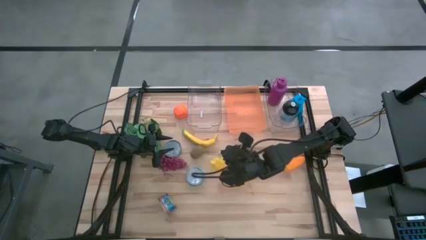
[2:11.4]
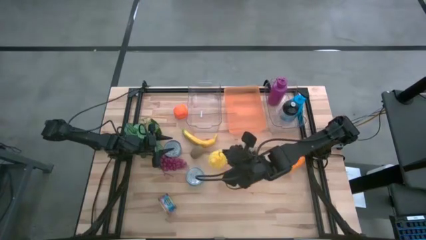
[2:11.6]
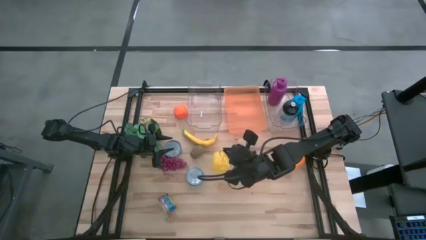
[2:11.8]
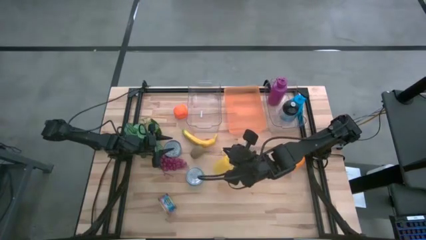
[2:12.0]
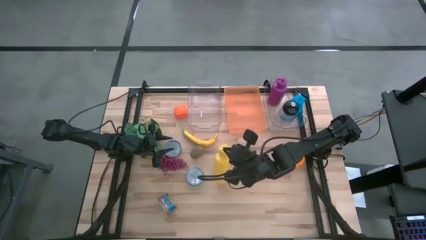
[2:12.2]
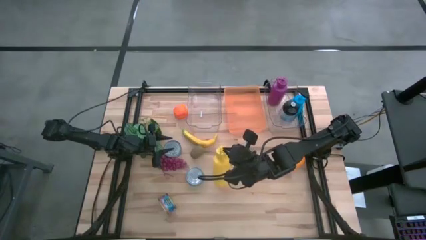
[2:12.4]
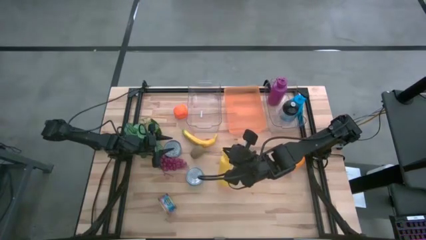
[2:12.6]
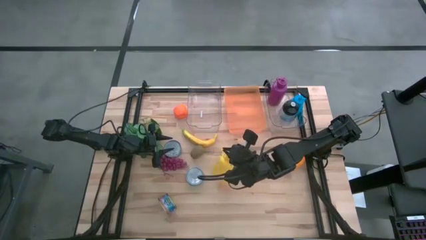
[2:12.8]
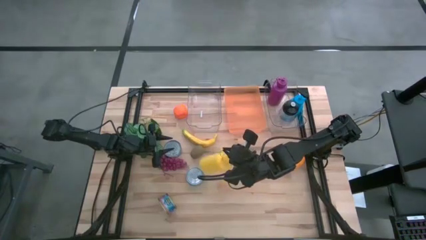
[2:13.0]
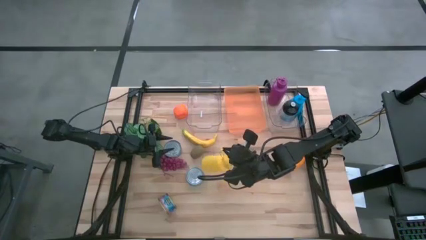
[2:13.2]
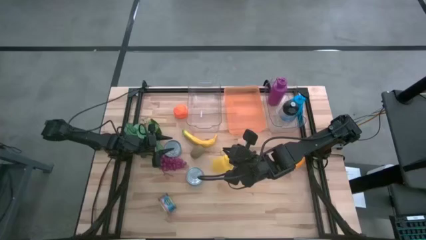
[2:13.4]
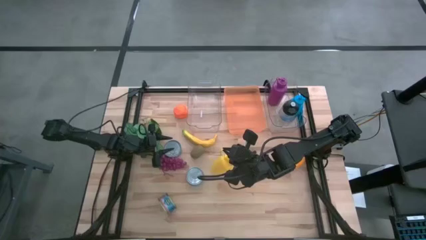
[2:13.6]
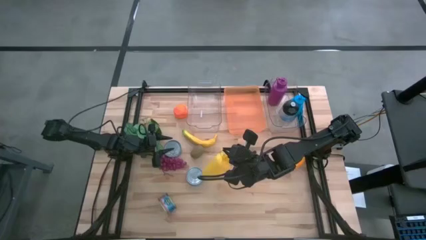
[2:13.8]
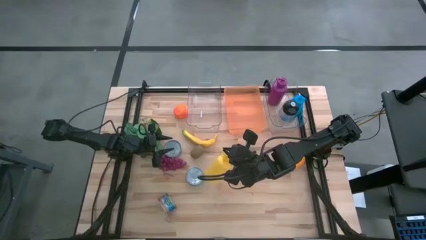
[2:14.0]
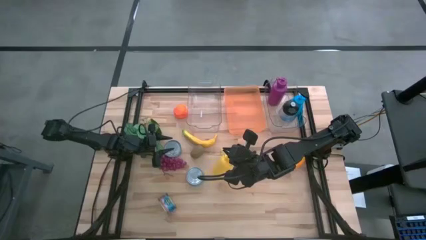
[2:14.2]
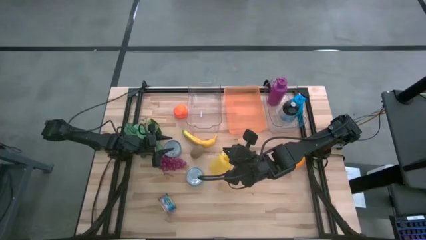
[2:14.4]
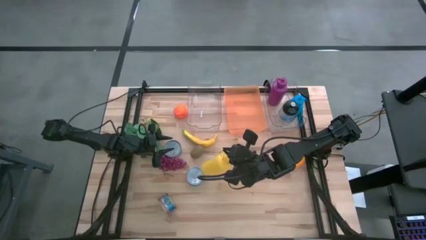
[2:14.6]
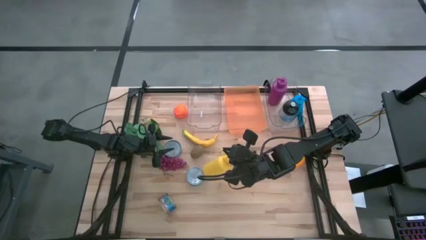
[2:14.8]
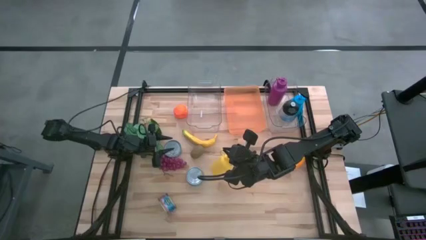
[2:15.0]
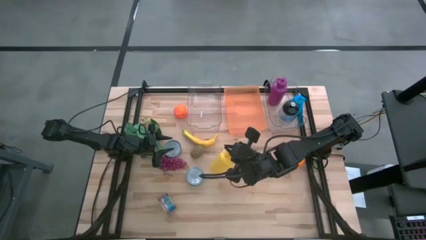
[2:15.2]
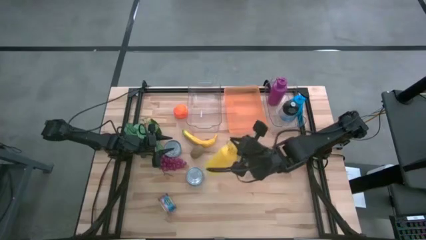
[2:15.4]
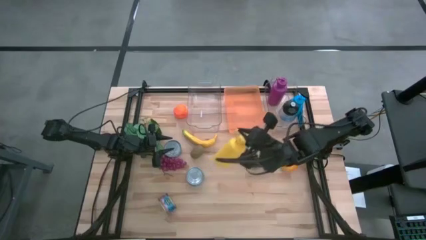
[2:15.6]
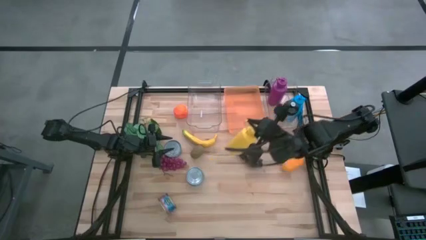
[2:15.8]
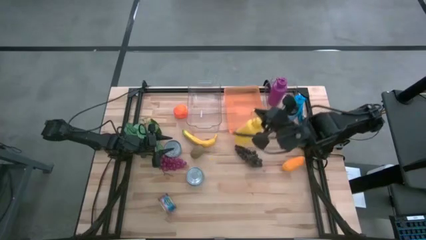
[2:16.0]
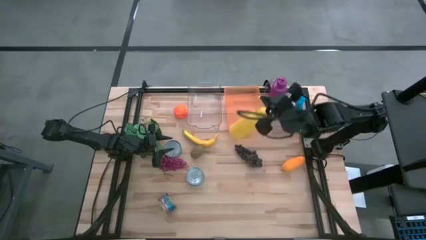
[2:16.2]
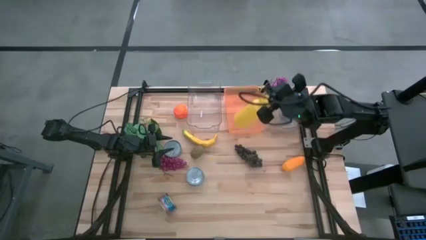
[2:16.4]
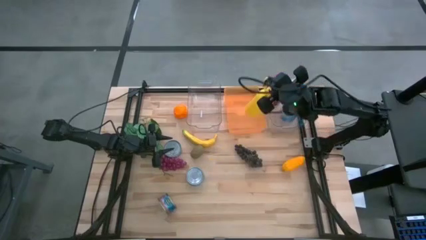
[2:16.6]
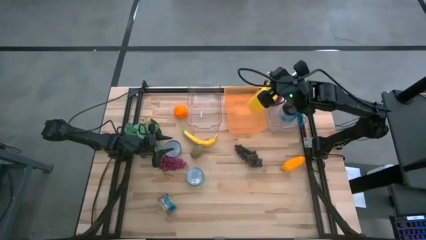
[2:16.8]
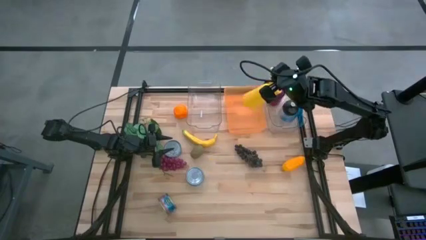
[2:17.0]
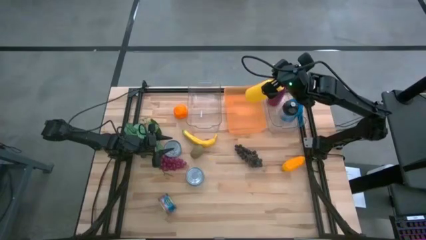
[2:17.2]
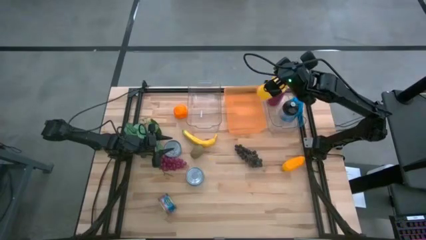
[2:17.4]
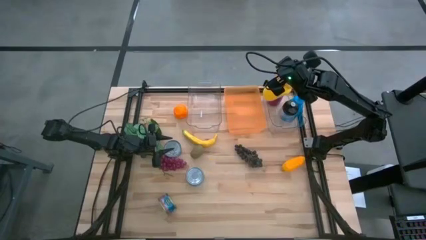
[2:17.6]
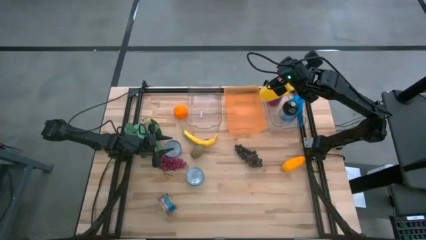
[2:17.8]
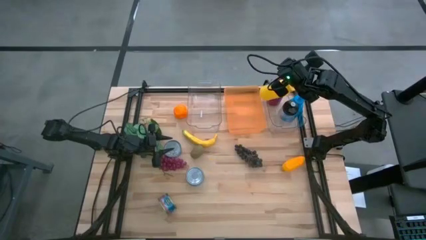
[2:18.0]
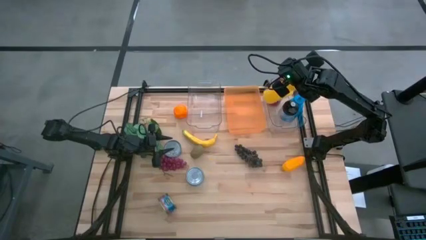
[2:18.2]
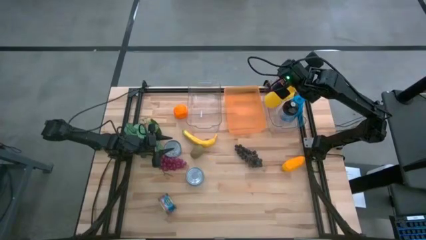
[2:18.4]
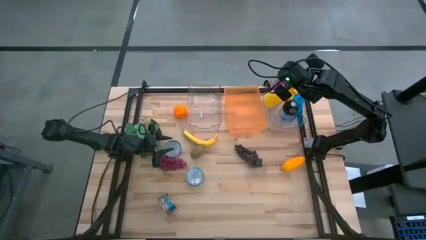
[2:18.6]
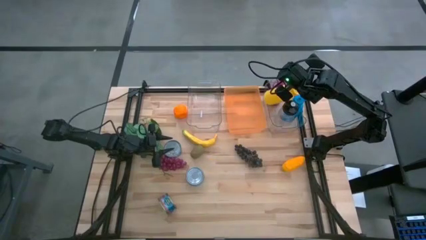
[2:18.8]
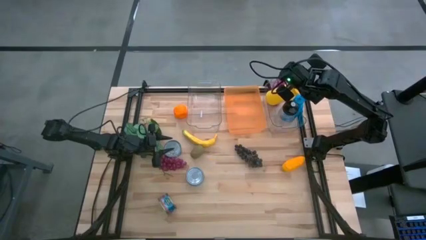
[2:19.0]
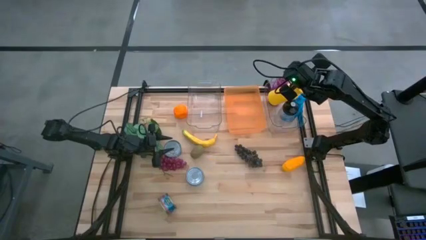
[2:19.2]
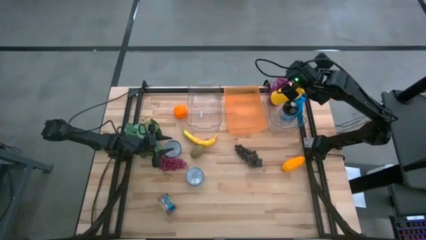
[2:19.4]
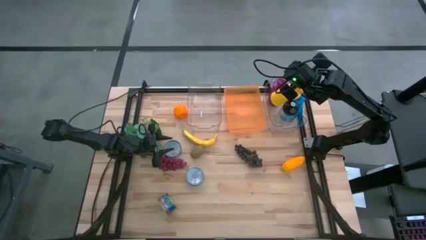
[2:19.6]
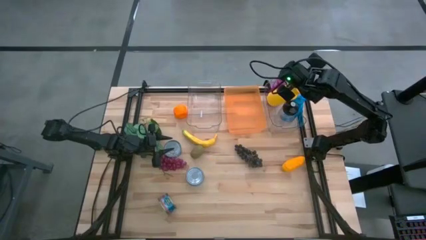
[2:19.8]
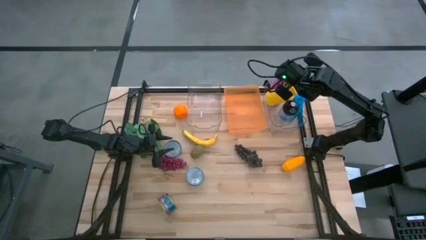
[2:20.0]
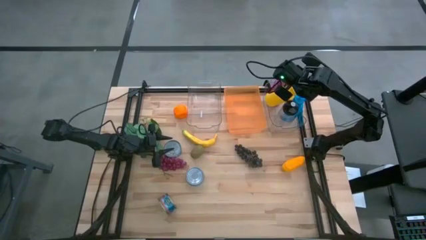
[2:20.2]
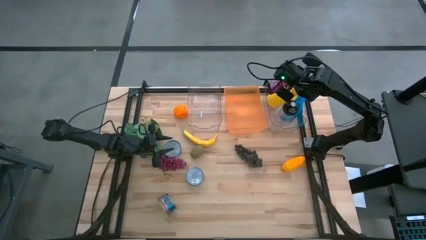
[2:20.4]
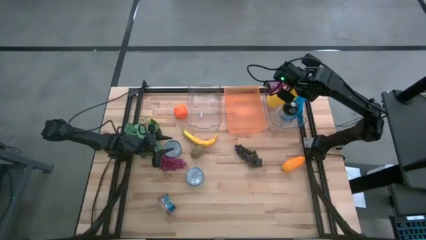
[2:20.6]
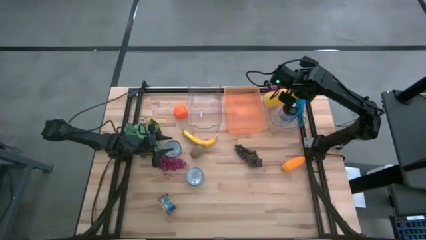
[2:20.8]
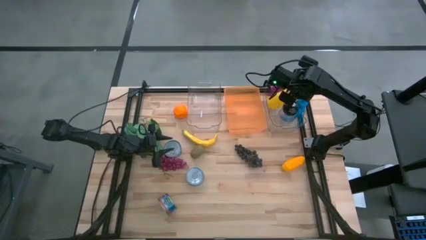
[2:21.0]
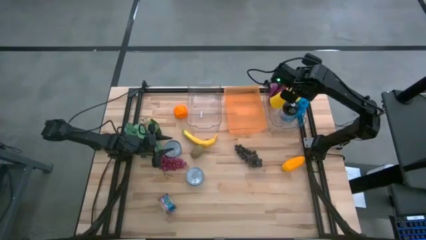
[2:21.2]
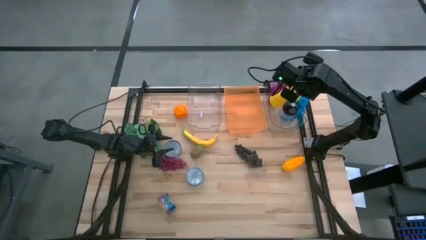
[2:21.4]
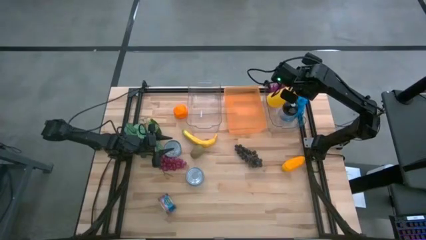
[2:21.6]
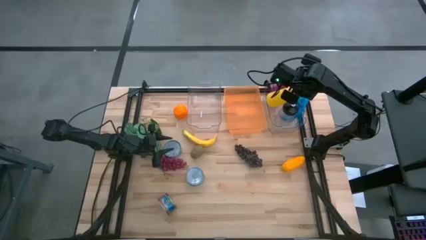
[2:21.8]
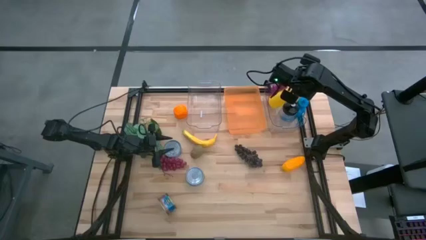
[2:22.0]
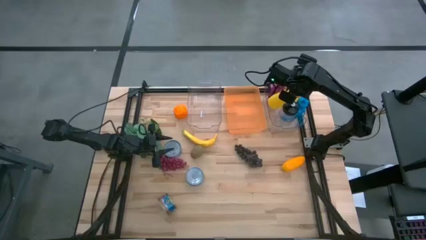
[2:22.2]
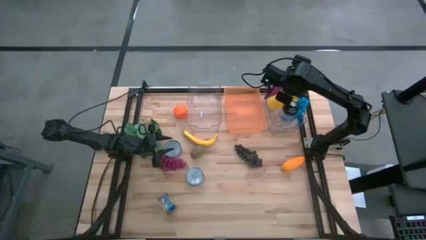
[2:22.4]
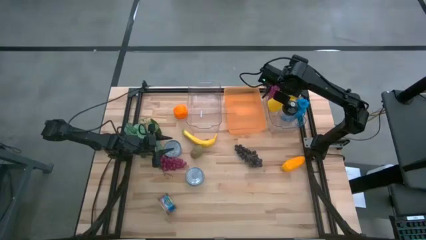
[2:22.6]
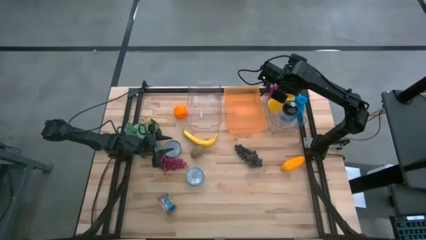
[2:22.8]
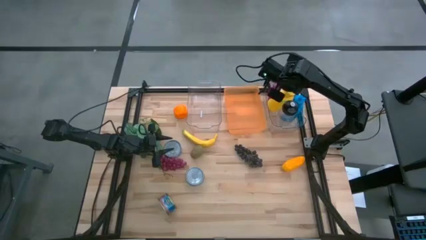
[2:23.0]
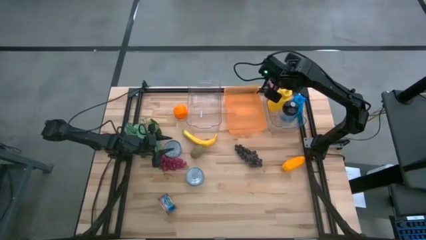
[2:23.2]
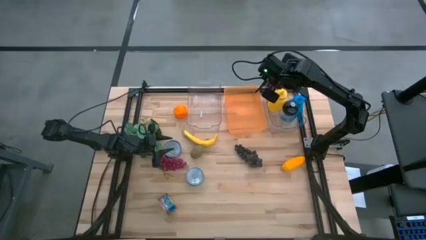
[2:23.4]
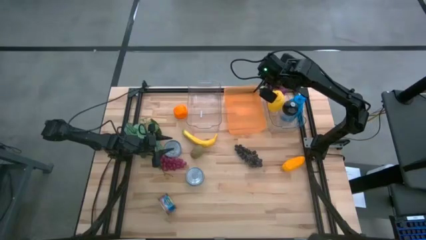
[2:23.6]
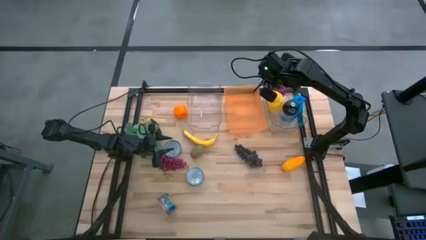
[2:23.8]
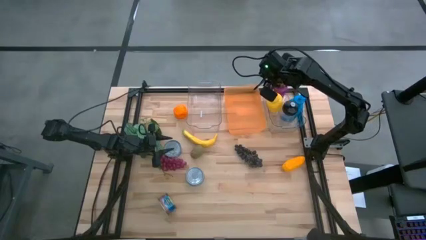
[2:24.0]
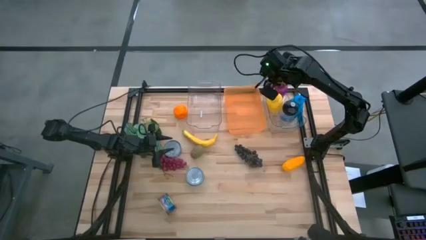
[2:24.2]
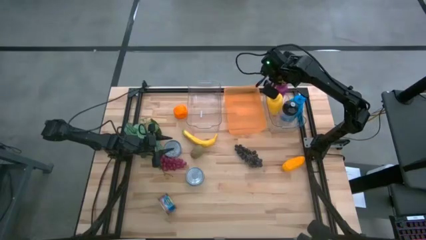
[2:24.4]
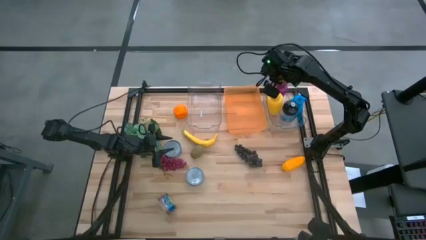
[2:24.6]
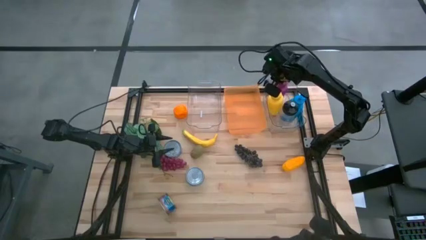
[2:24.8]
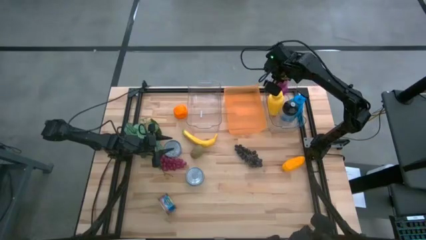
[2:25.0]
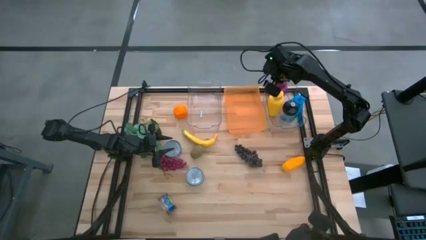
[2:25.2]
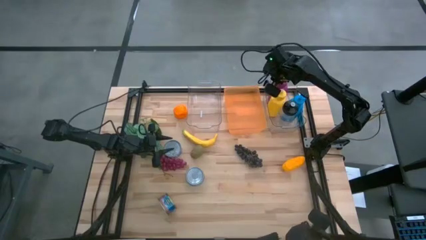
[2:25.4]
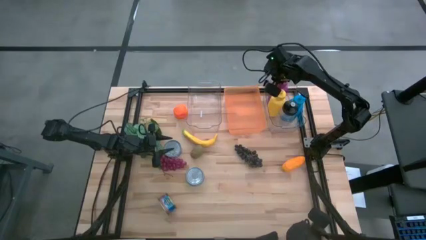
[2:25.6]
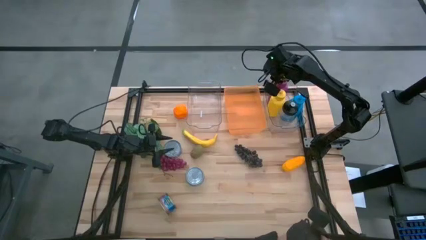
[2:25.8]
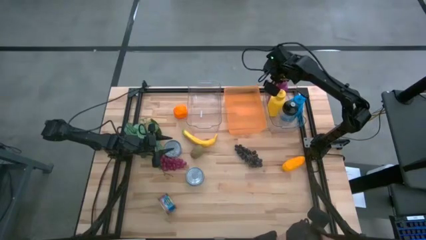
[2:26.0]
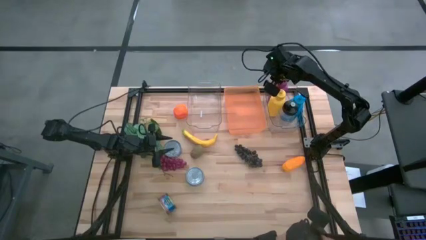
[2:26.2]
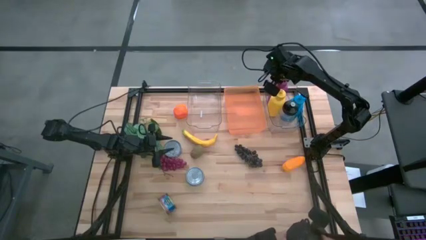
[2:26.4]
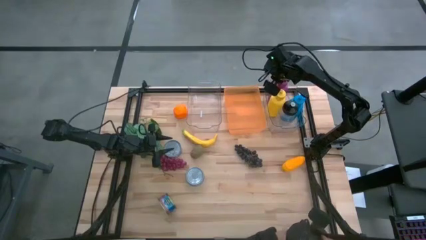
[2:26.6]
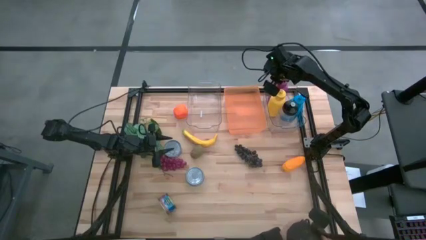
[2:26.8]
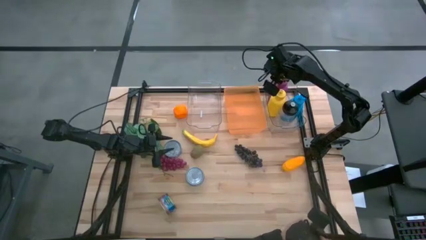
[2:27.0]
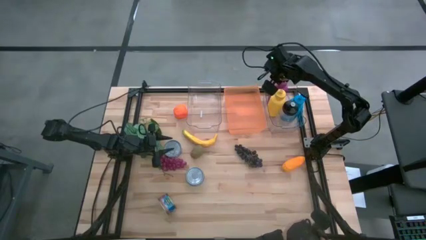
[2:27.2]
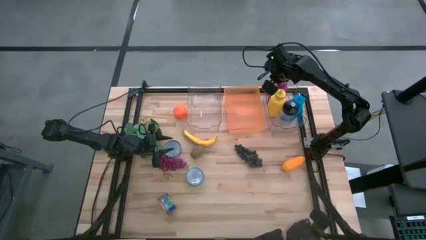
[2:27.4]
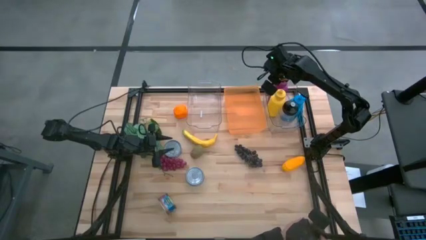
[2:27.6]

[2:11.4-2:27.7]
Task: Pick & Place Food Item
Put the yellow water bottle into the right transparent bin
